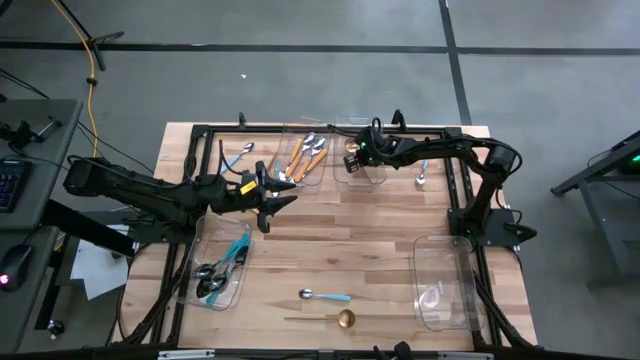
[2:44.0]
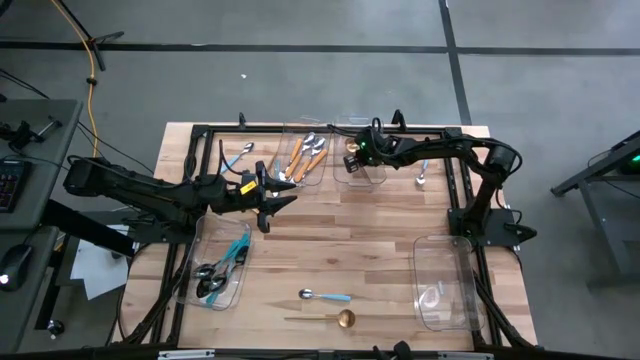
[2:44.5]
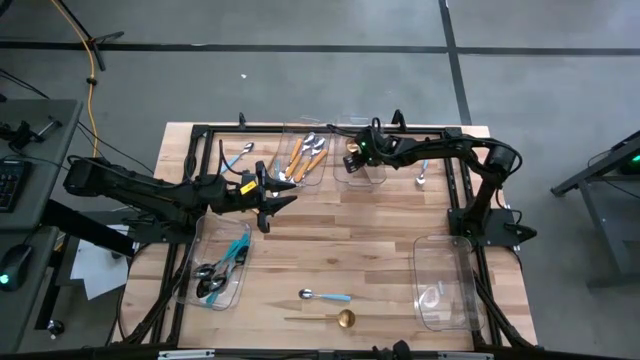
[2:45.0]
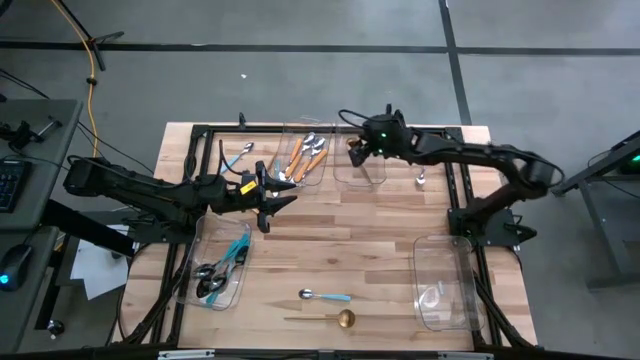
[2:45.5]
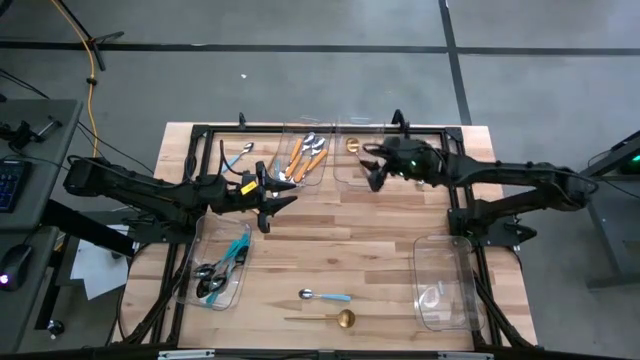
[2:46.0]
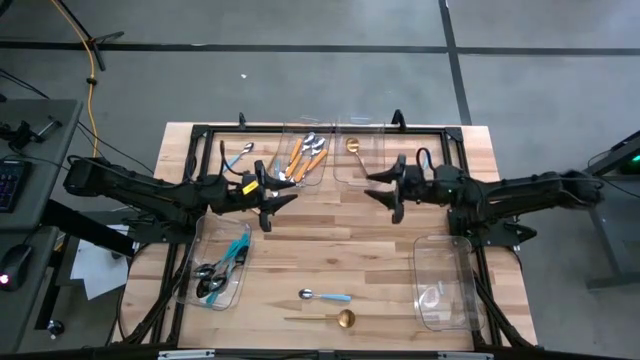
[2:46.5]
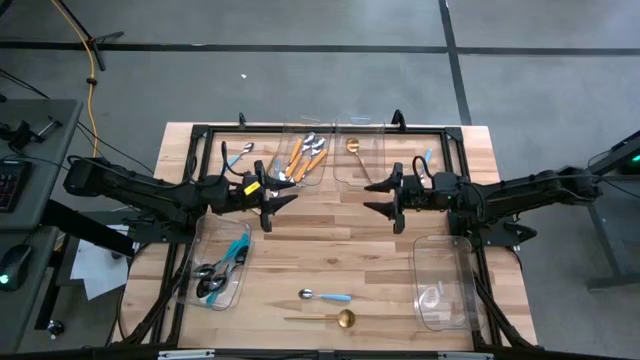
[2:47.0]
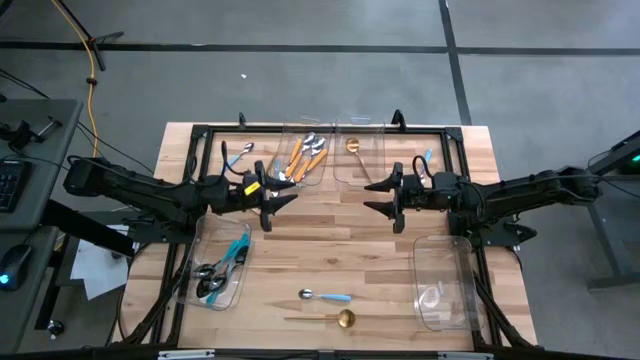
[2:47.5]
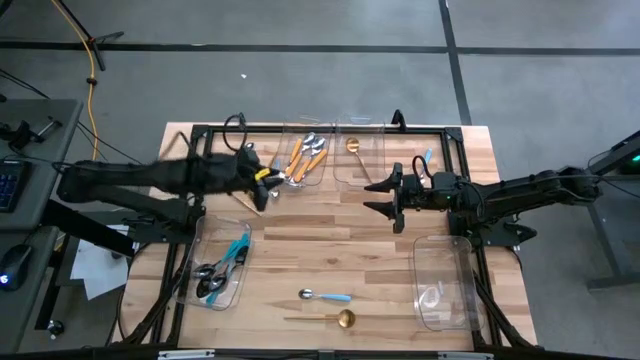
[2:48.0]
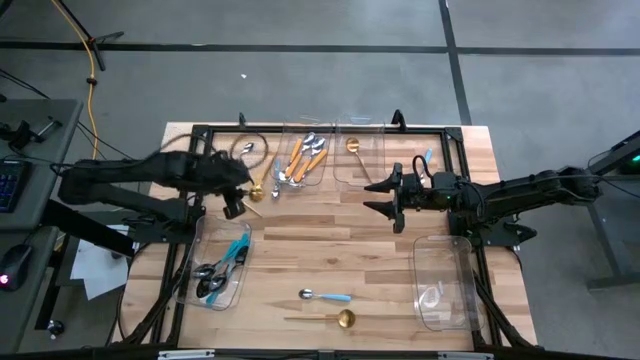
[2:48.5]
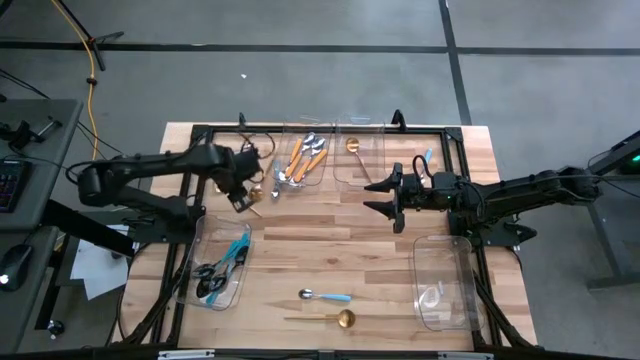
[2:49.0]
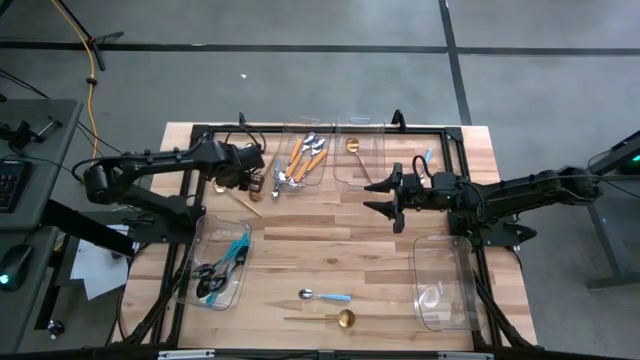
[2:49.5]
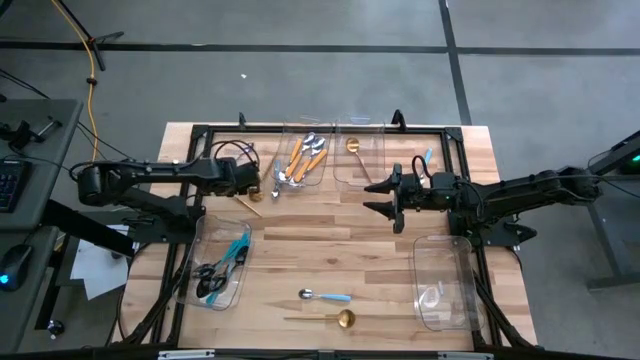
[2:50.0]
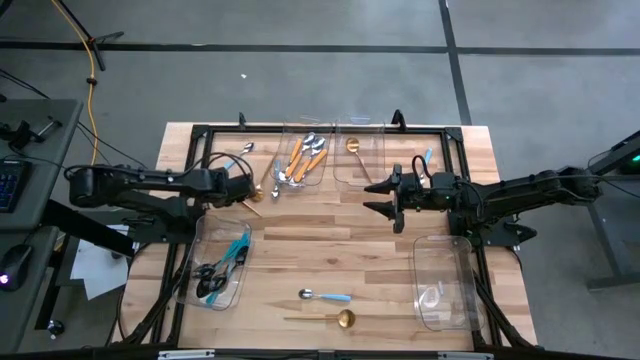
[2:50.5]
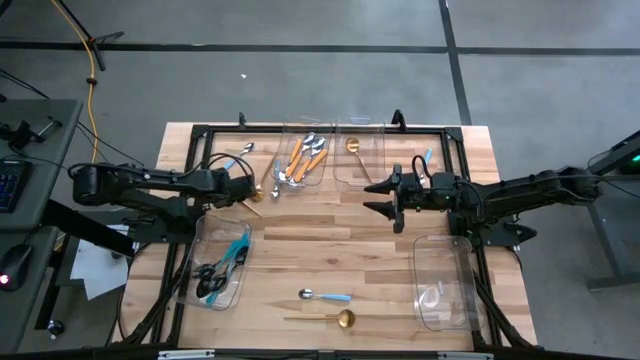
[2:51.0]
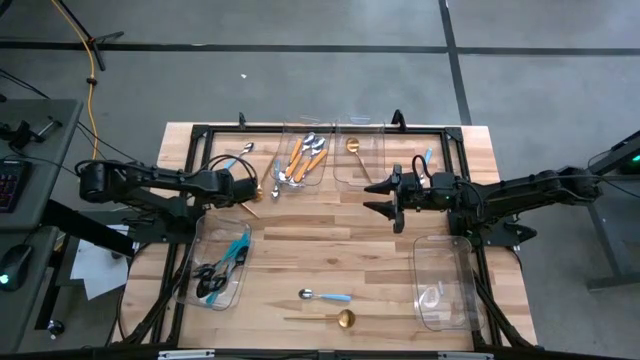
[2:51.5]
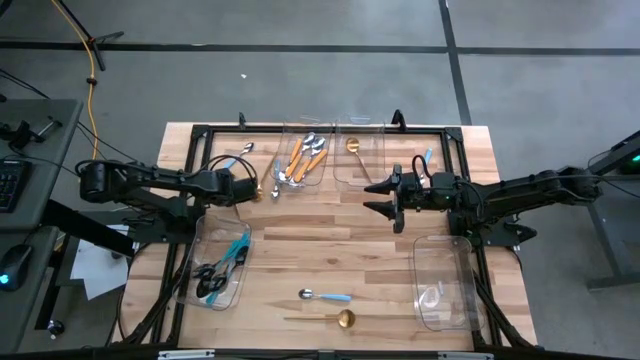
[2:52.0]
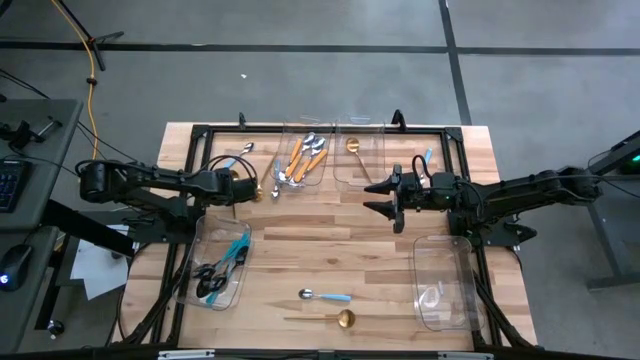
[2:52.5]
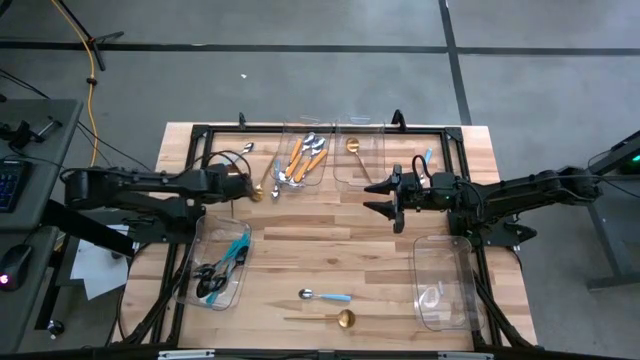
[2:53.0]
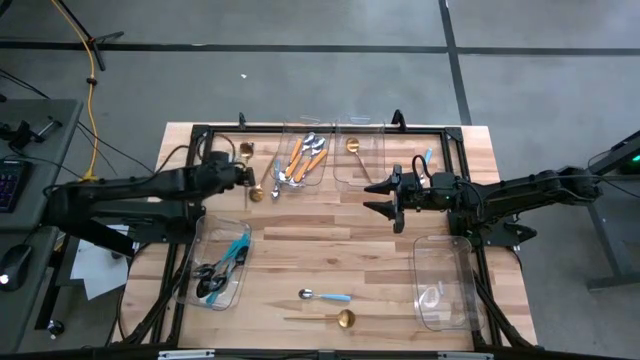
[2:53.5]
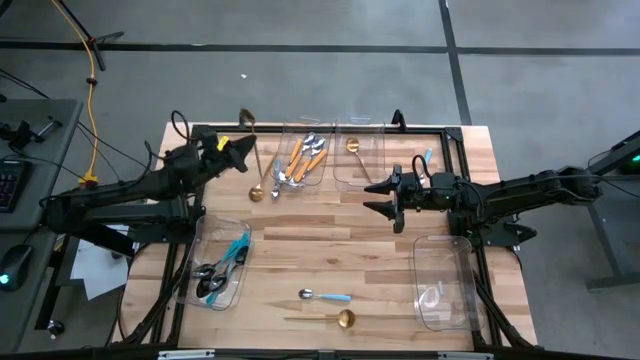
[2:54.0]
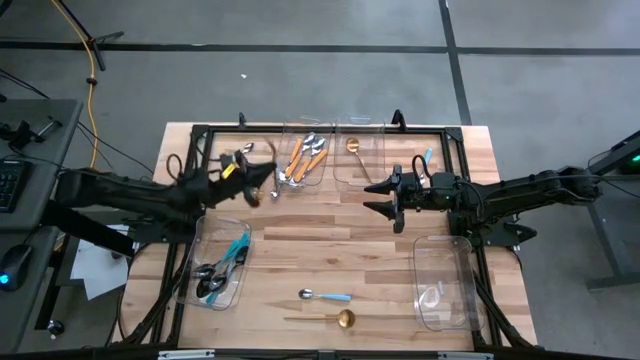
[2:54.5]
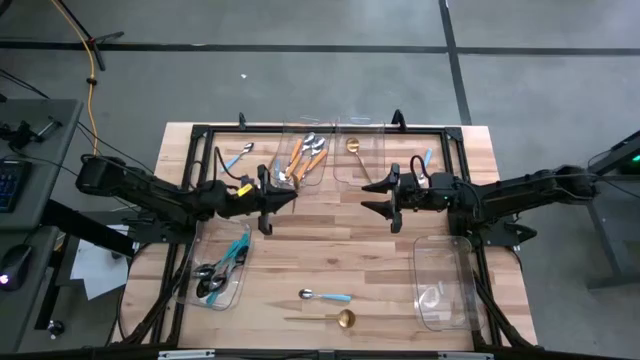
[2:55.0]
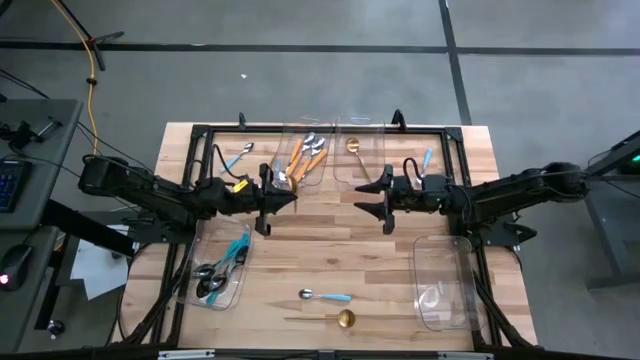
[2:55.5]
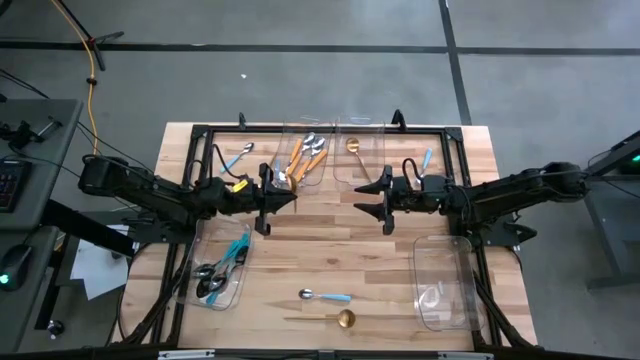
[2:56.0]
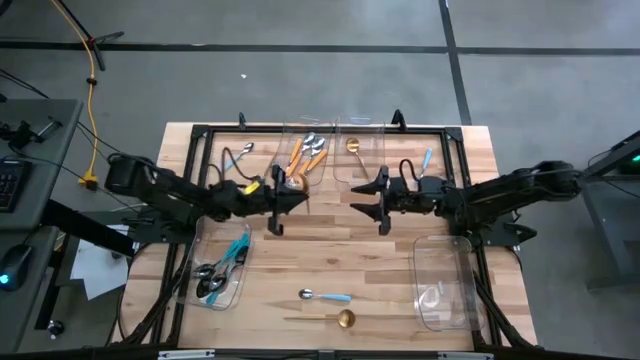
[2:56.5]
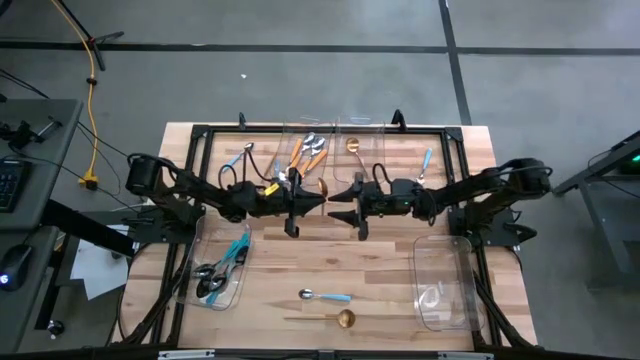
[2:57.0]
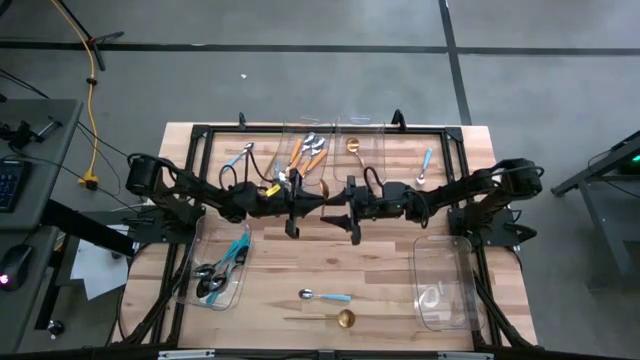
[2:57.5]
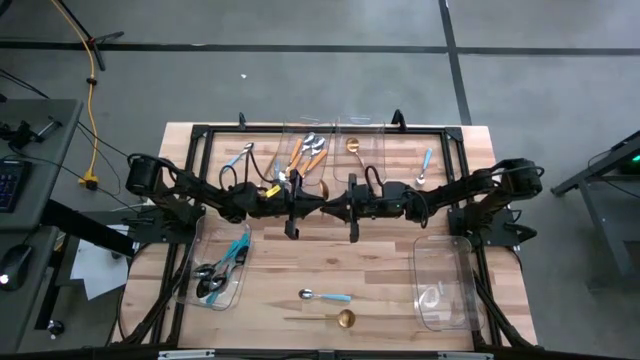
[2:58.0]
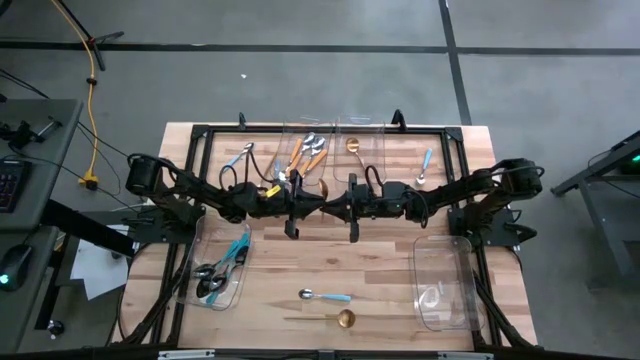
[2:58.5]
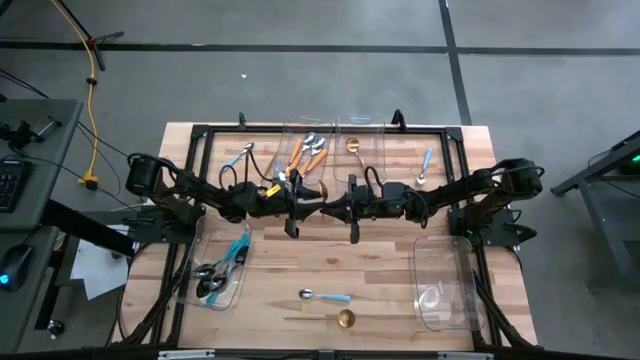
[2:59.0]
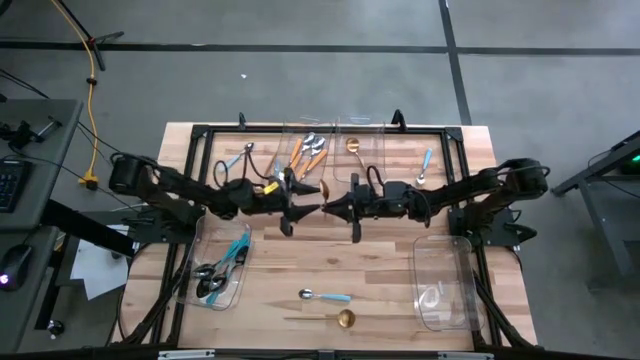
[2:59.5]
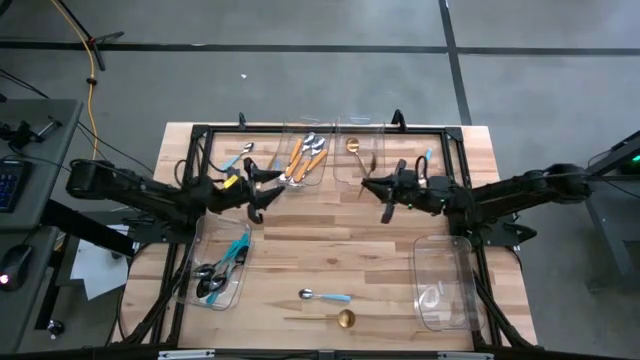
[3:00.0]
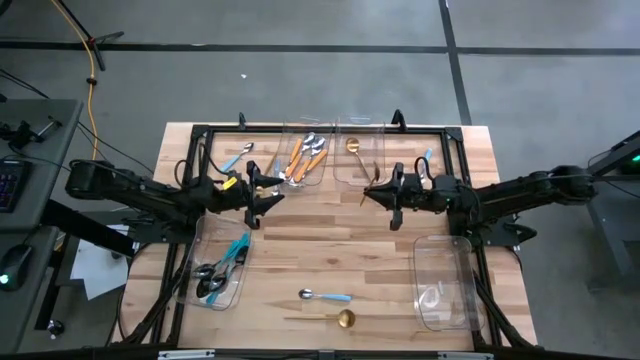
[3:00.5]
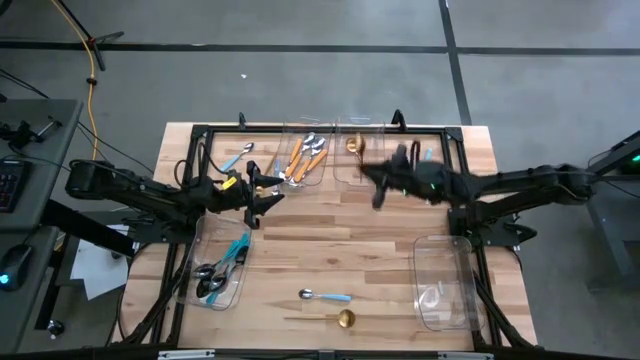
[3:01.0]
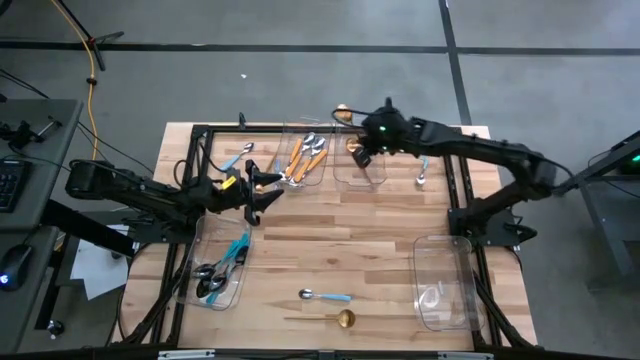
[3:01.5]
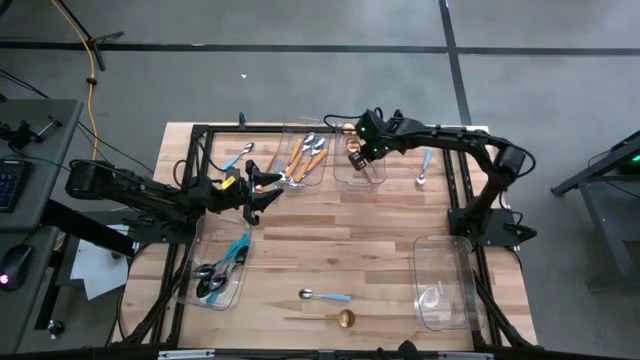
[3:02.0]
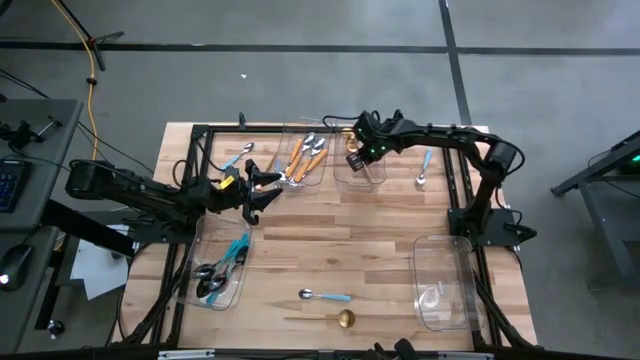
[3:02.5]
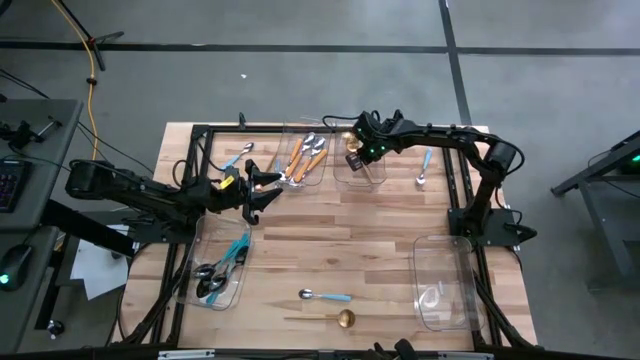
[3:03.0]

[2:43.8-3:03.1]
Task: Sort silverware by color (type)
Put the gold spoon into the top right transparent bin
